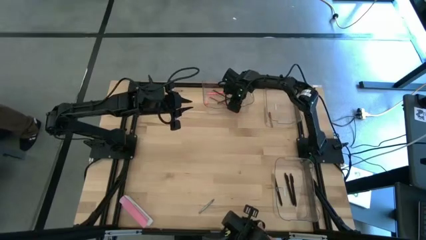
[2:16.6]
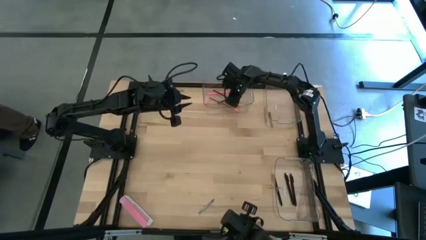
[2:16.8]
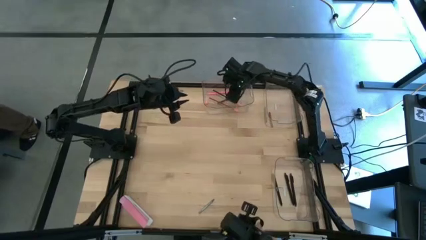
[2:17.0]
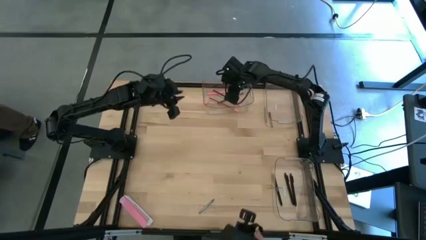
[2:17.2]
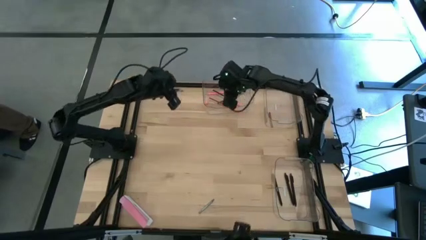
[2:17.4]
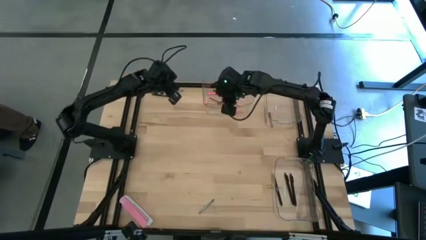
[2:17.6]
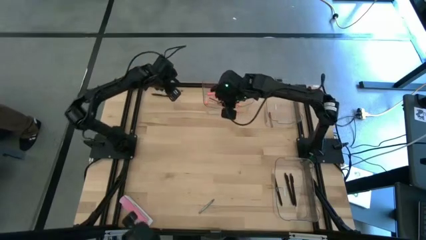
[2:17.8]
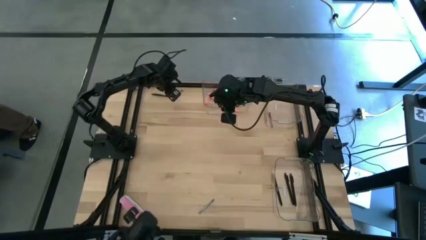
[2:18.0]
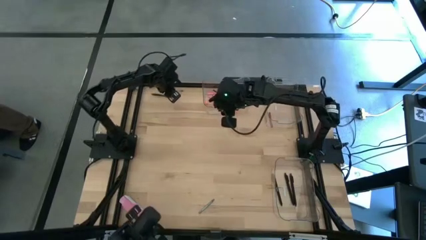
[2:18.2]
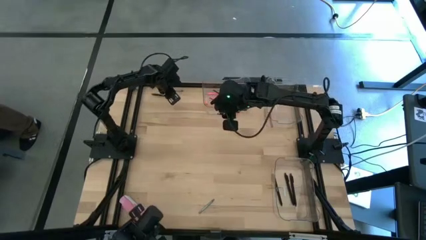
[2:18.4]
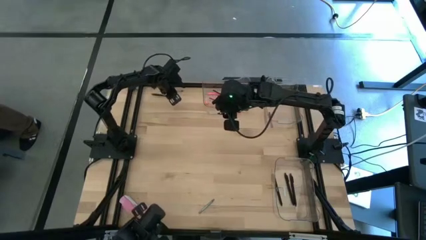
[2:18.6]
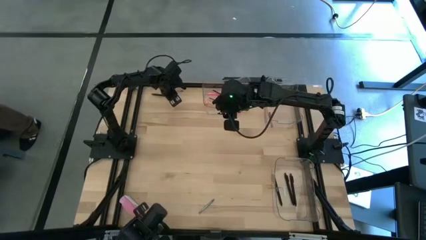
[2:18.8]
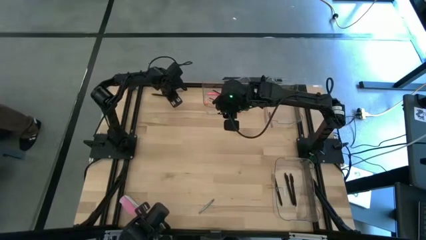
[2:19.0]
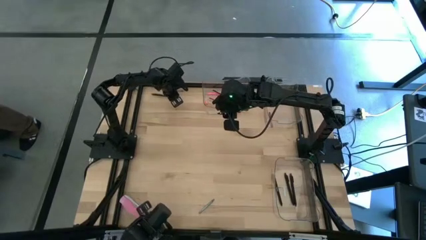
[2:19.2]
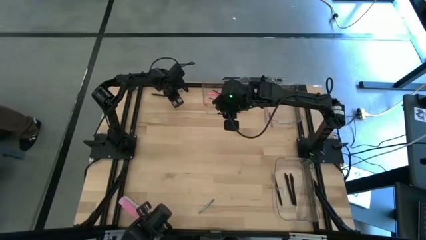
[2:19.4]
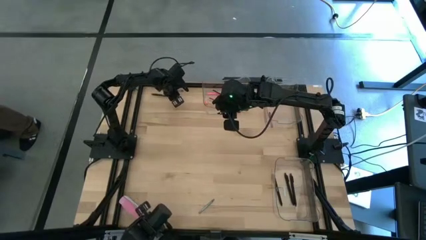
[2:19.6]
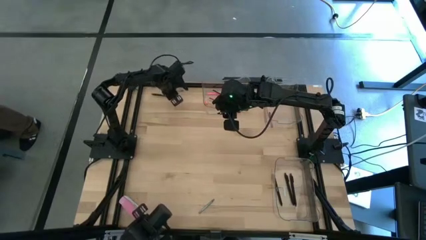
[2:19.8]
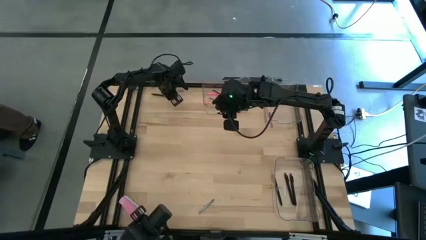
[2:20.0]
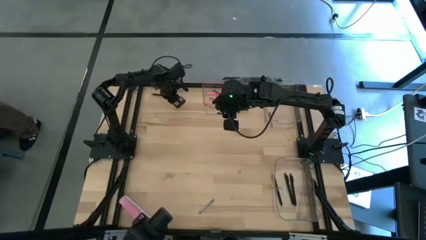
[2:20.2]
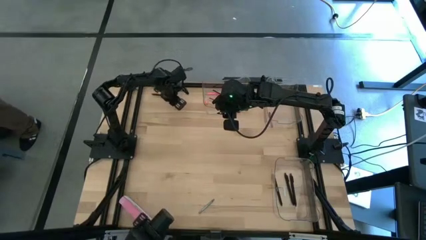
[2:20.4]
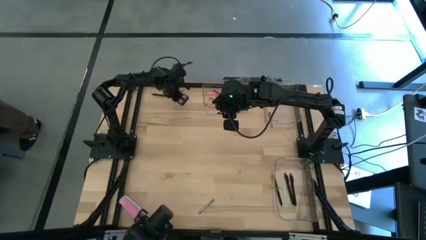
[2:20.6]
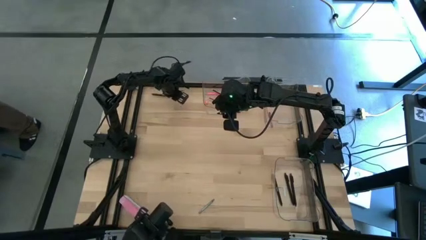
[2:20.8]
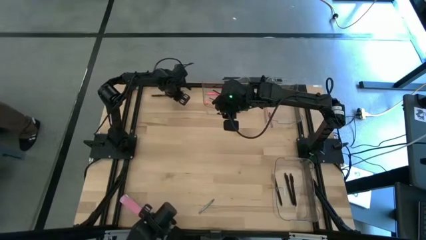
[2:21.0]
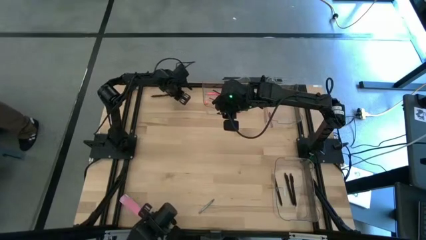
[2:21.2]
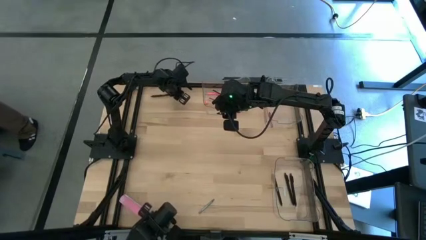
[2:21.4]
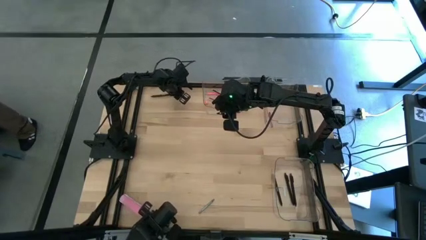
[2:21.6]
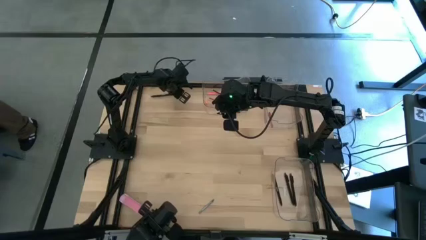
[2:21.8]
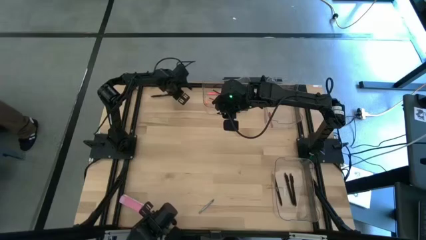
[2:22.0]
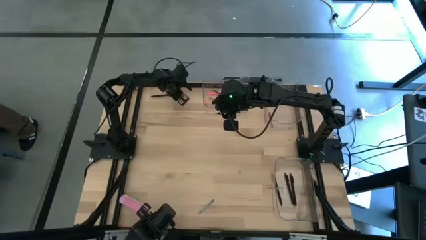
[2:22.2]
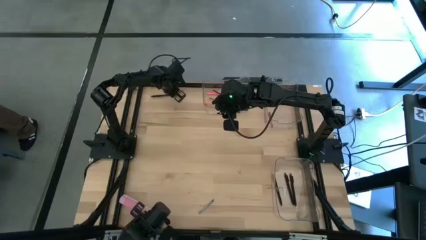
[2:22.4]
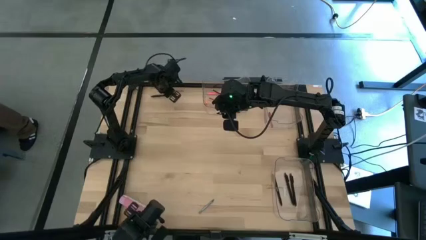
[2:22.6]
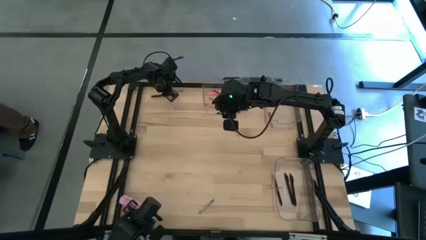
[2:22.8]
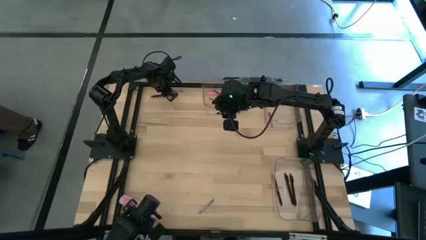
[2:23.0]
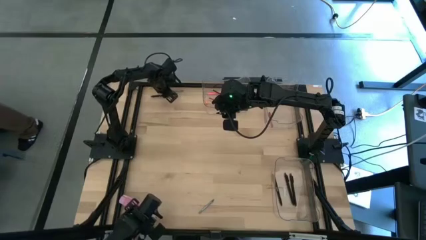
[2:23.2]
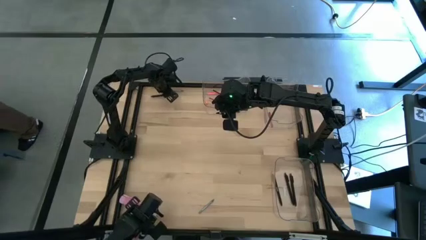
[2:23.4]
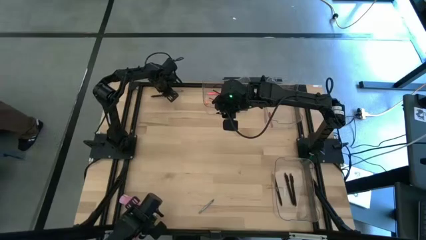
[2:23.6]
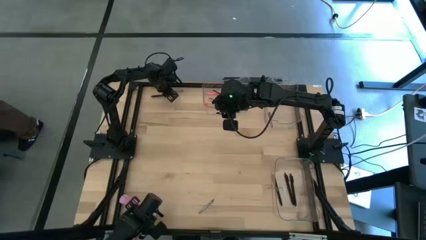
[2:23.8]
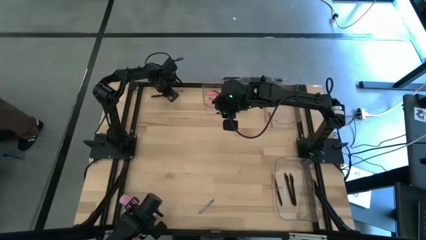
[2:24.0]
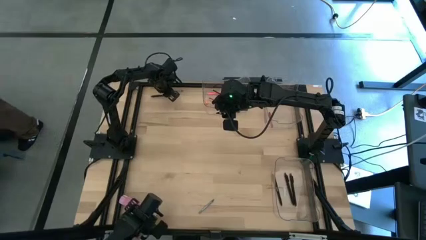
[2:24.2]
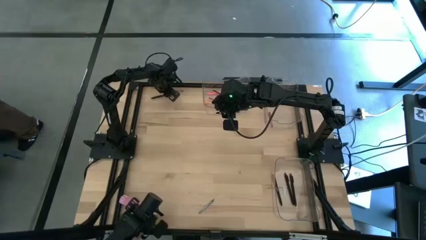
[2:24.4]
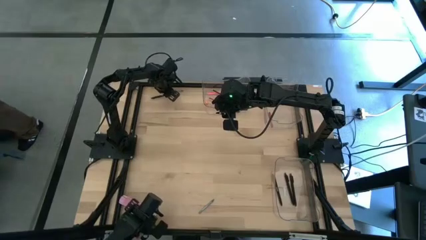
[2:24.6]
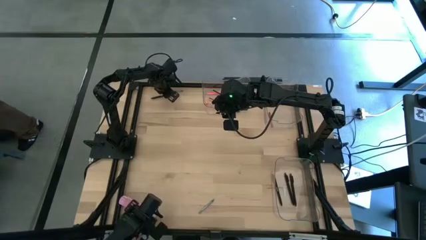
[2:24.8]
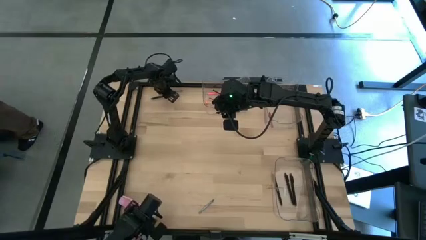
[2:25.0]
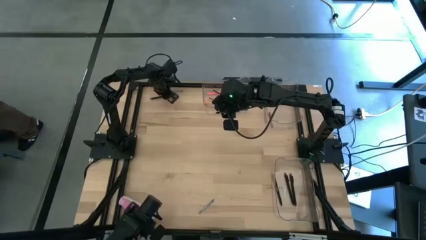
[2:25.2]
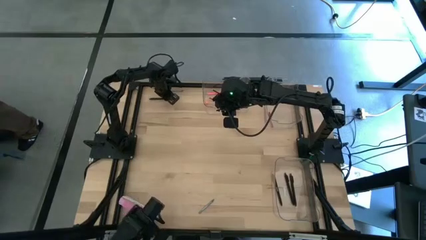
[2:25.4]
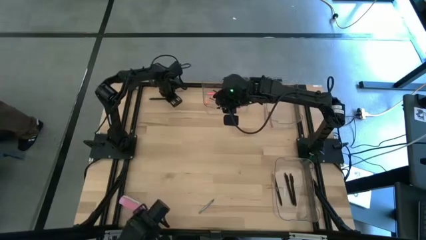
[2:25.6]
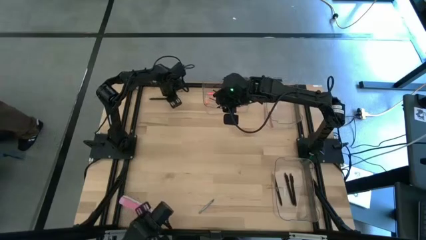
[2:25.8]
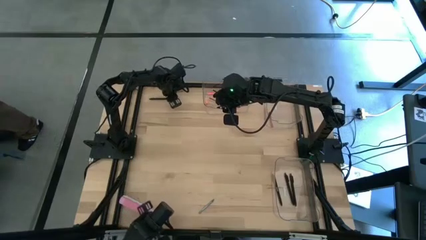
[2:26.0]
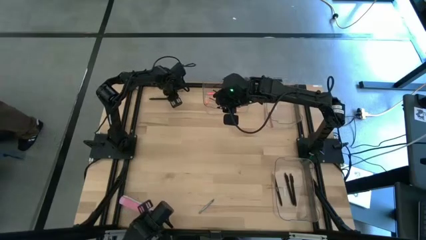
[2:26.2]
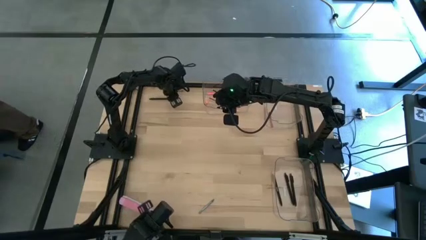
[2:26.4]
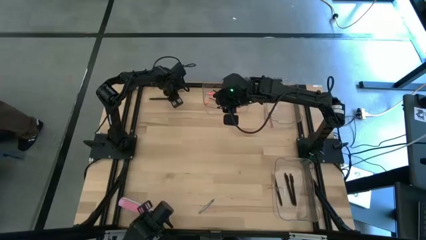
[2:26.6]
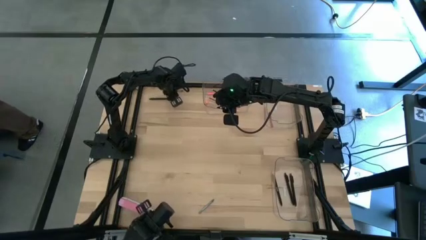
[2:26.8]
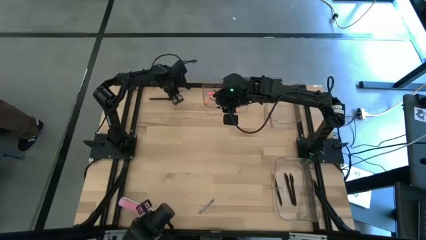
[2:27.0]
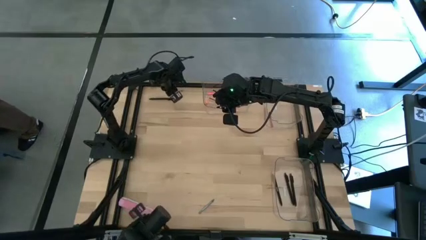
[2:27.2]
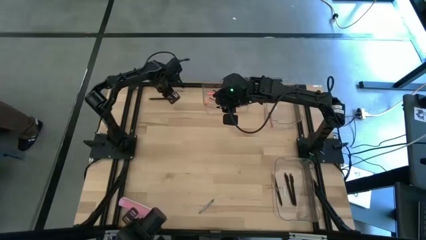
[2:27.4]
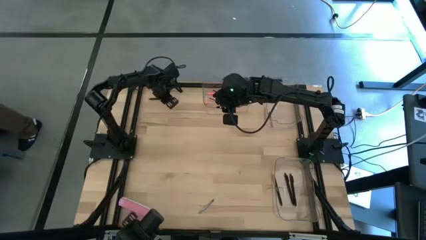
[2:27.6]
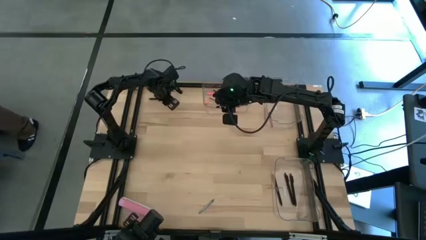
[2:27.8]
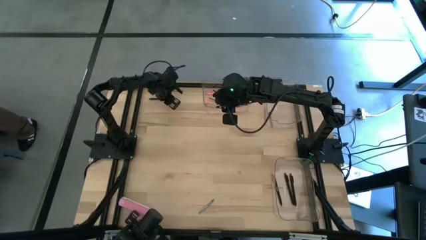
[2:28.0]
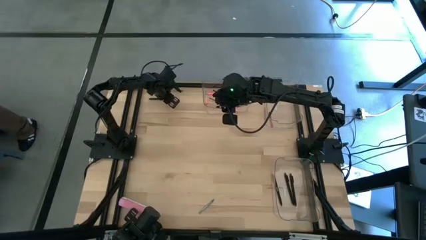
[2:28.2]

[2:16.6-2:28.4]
Task: Sort crayons/erasers/pens/pencils in bins
Put the black pen into the bottom right transparent bin
